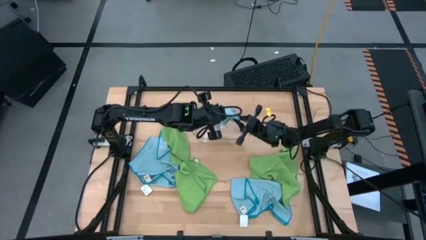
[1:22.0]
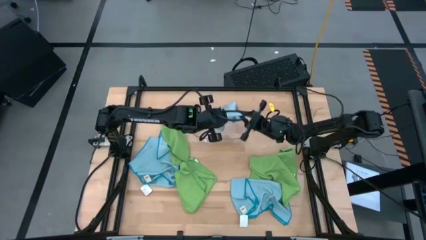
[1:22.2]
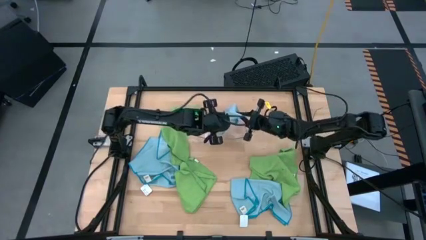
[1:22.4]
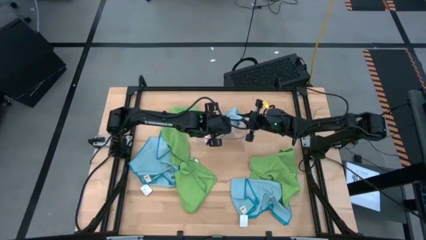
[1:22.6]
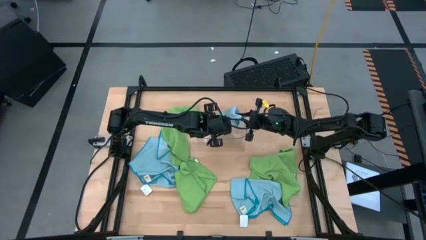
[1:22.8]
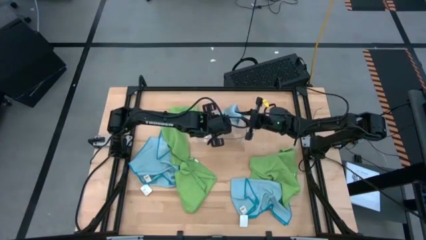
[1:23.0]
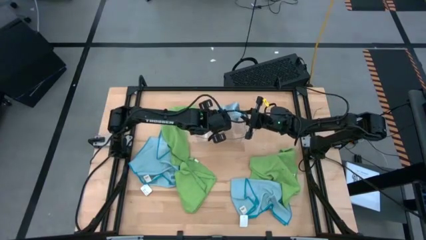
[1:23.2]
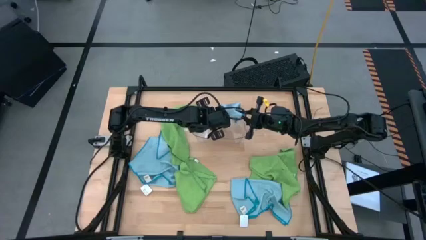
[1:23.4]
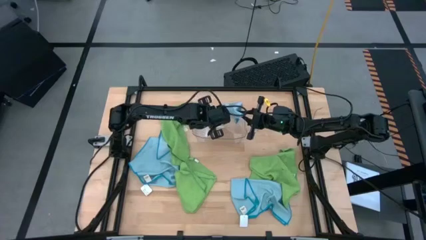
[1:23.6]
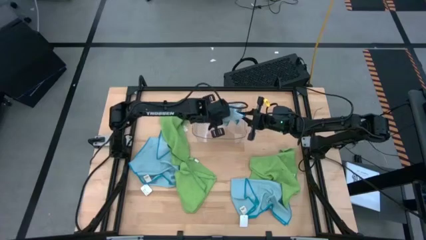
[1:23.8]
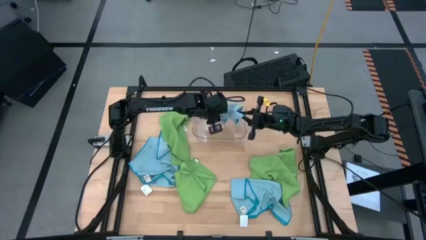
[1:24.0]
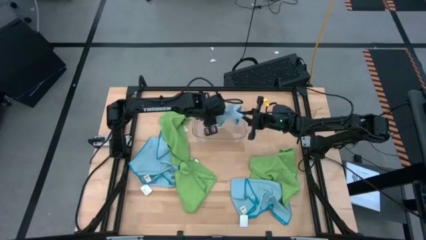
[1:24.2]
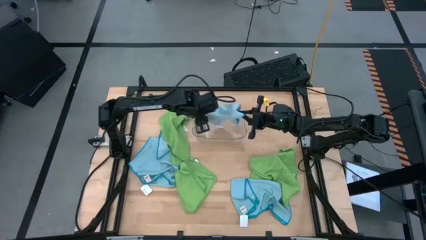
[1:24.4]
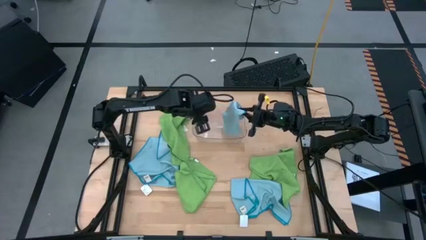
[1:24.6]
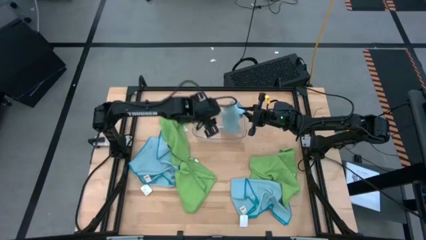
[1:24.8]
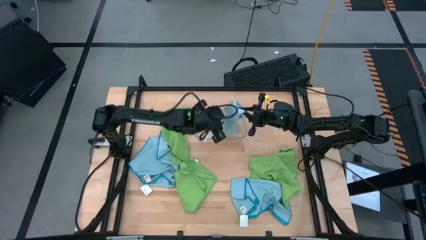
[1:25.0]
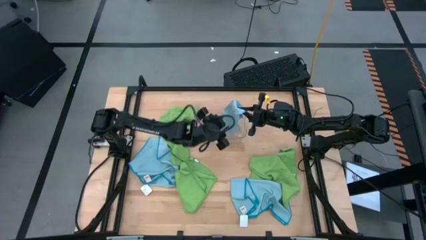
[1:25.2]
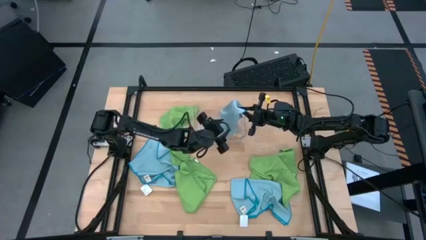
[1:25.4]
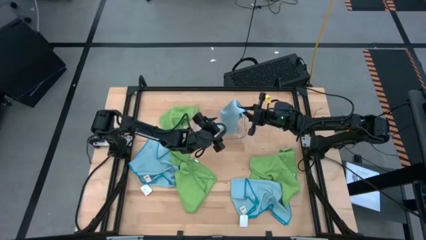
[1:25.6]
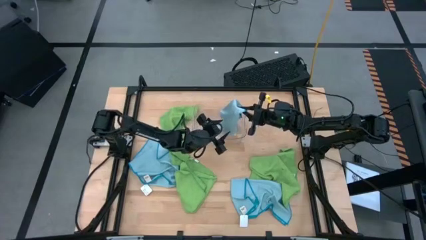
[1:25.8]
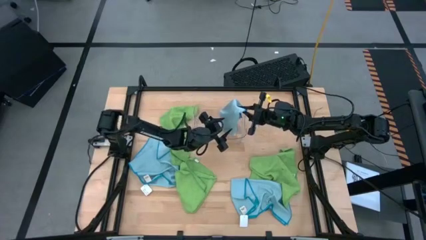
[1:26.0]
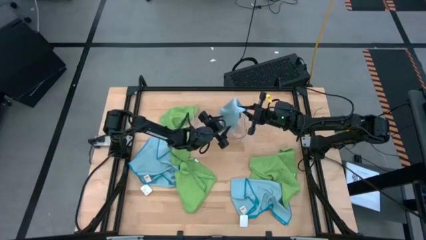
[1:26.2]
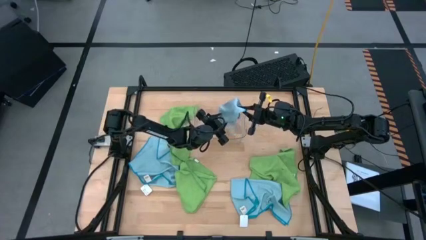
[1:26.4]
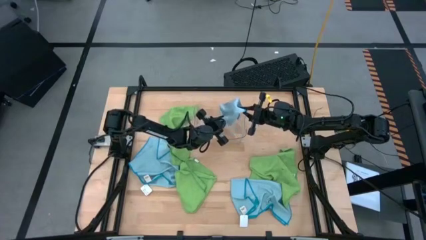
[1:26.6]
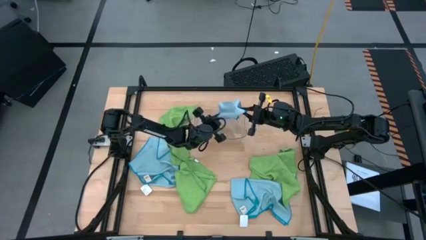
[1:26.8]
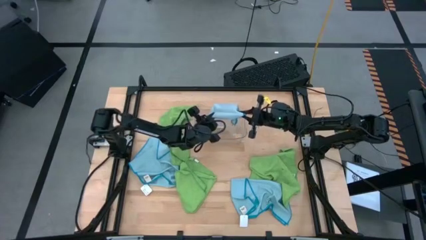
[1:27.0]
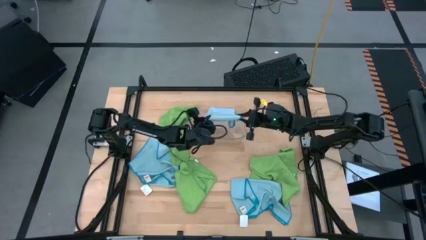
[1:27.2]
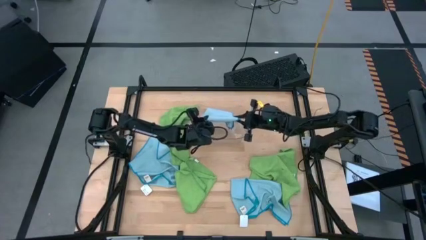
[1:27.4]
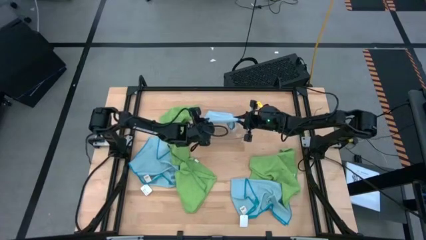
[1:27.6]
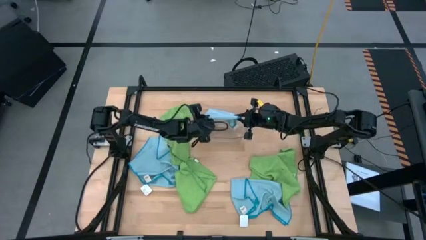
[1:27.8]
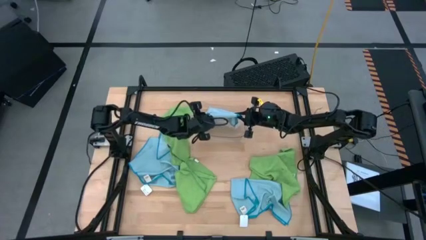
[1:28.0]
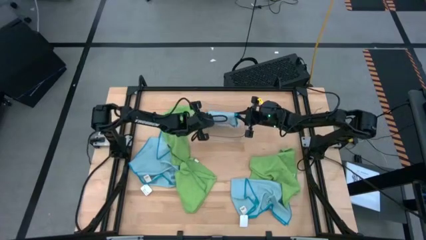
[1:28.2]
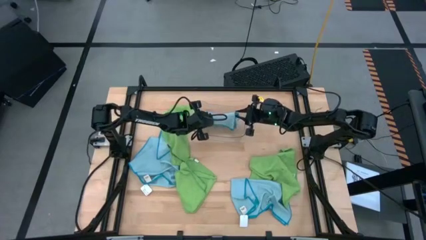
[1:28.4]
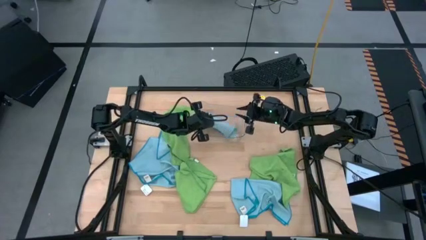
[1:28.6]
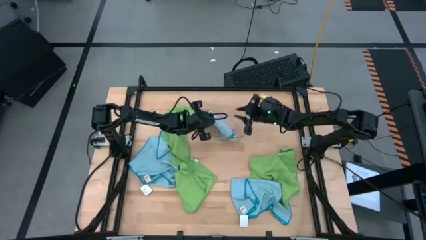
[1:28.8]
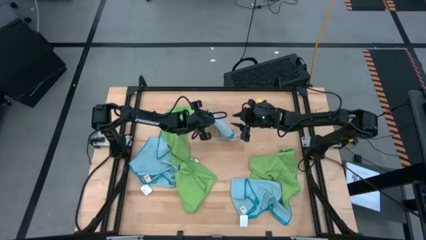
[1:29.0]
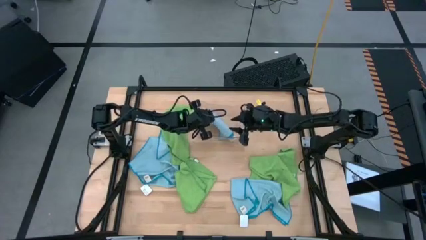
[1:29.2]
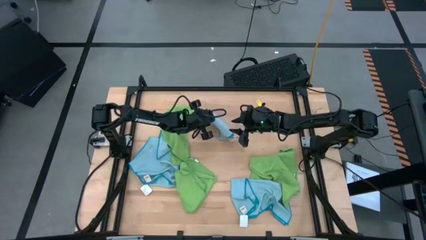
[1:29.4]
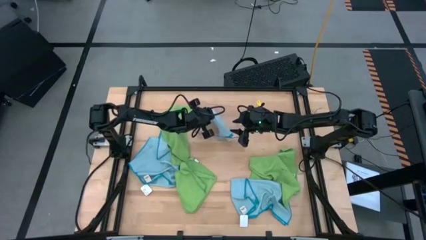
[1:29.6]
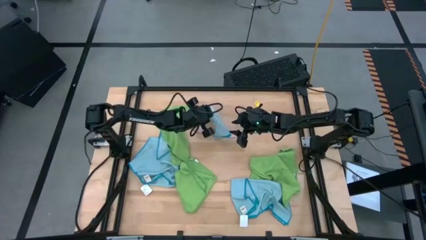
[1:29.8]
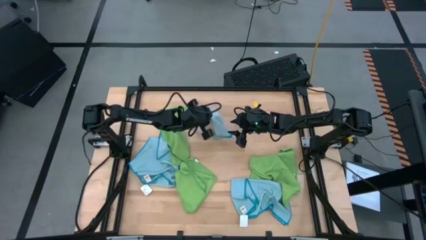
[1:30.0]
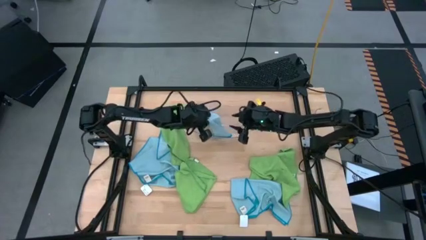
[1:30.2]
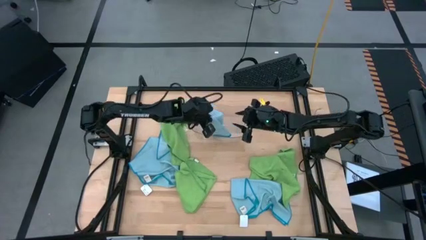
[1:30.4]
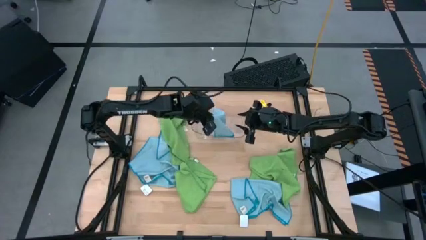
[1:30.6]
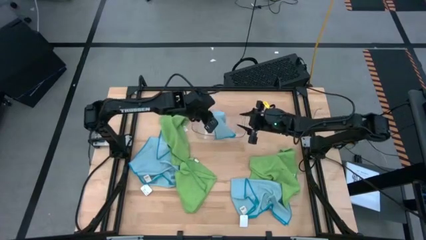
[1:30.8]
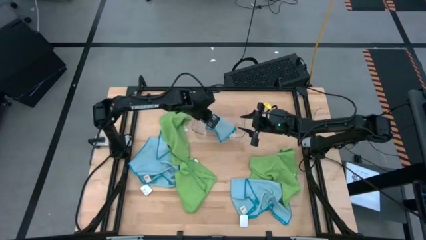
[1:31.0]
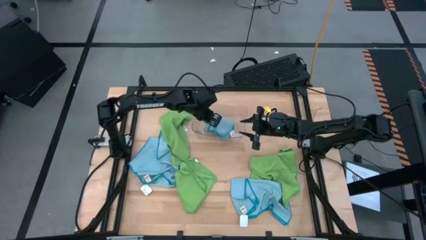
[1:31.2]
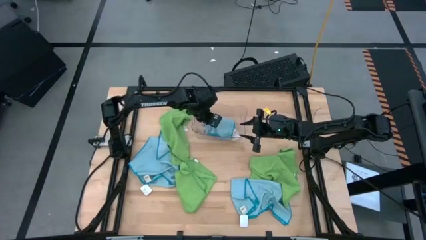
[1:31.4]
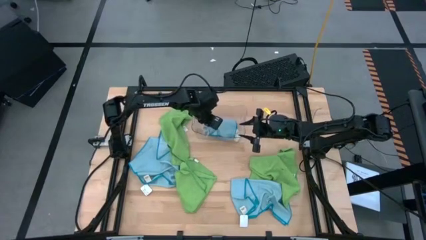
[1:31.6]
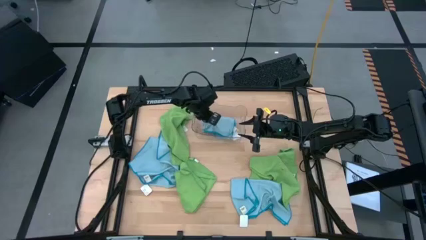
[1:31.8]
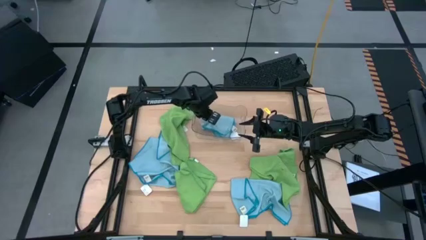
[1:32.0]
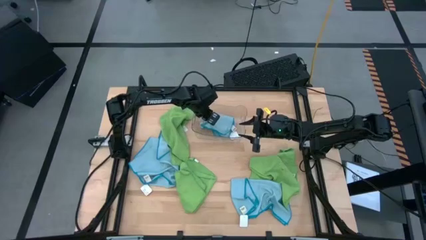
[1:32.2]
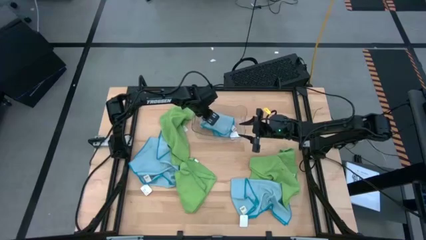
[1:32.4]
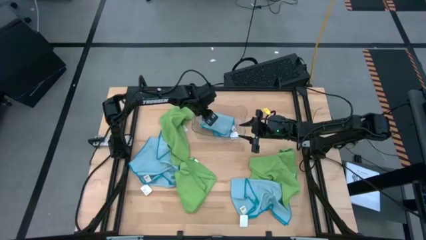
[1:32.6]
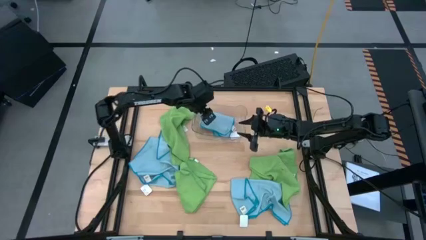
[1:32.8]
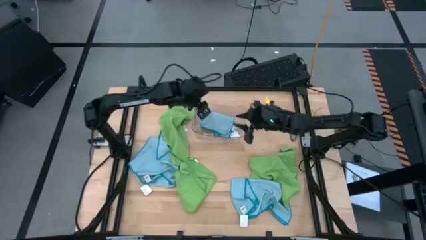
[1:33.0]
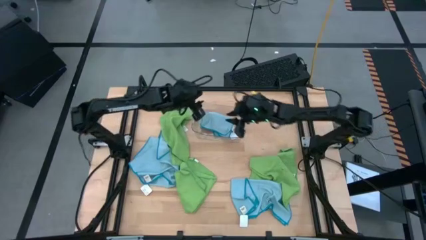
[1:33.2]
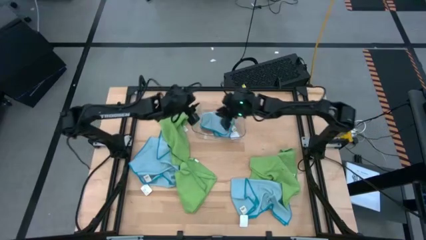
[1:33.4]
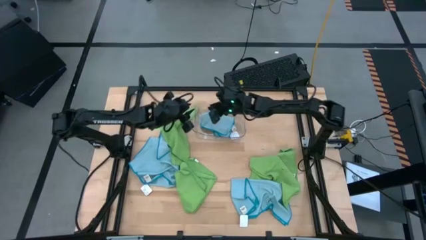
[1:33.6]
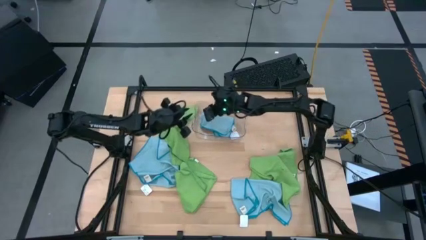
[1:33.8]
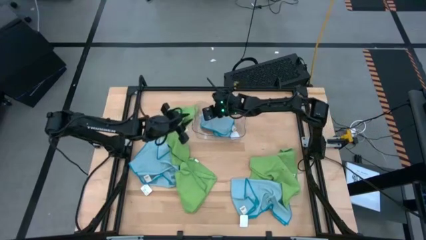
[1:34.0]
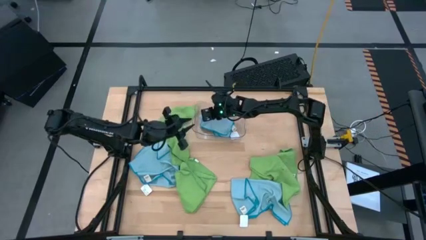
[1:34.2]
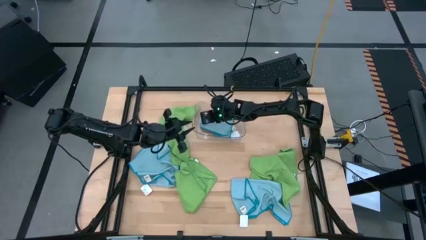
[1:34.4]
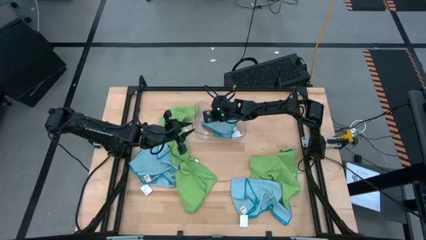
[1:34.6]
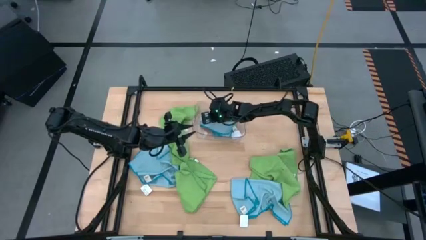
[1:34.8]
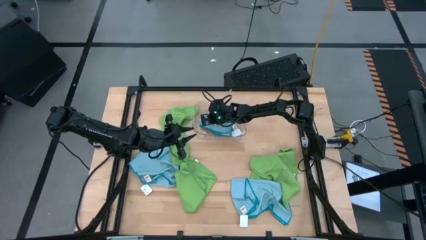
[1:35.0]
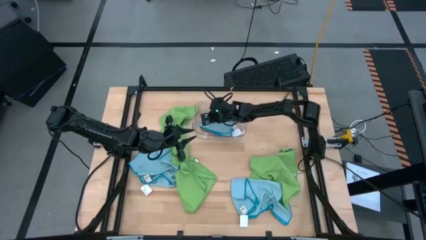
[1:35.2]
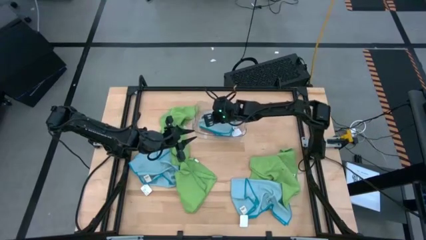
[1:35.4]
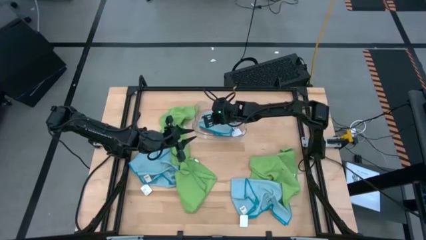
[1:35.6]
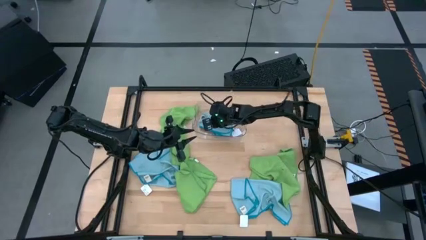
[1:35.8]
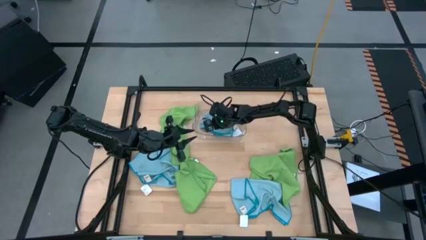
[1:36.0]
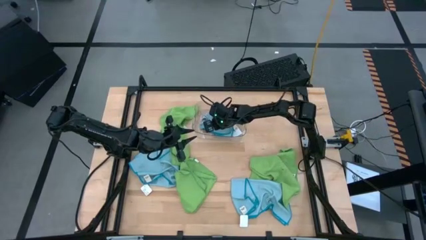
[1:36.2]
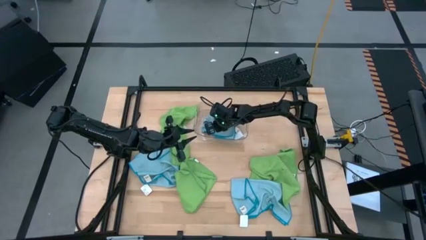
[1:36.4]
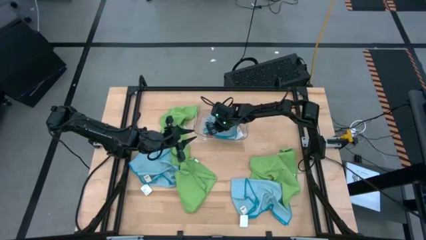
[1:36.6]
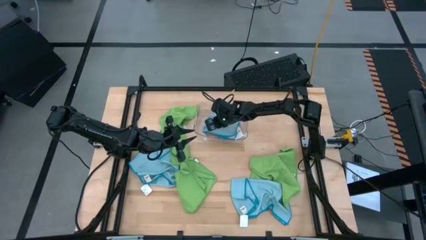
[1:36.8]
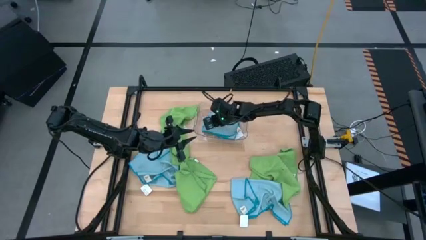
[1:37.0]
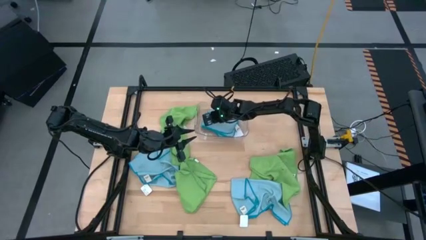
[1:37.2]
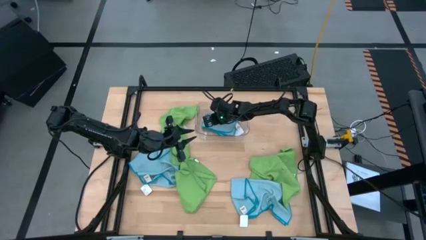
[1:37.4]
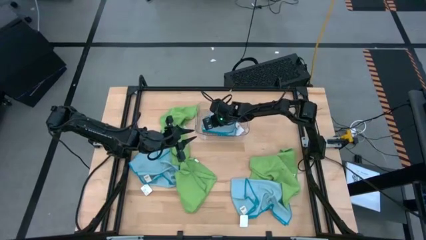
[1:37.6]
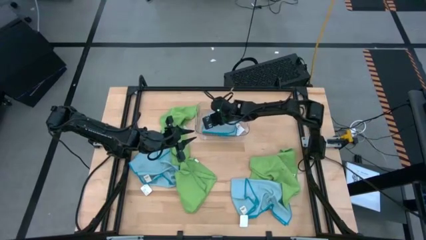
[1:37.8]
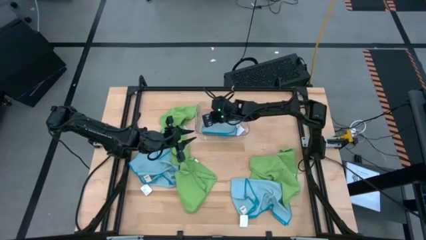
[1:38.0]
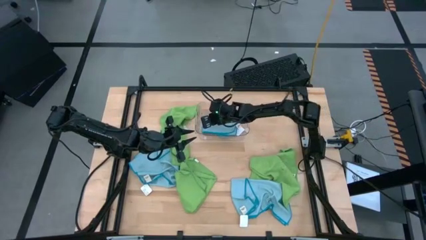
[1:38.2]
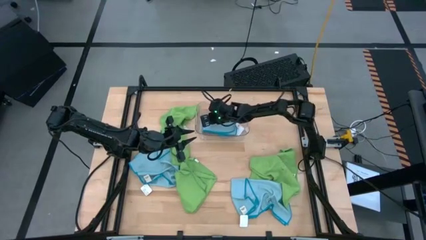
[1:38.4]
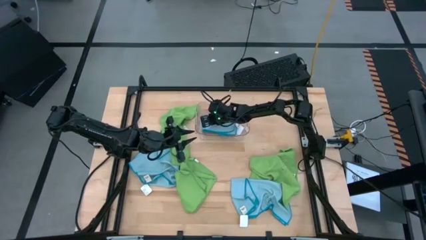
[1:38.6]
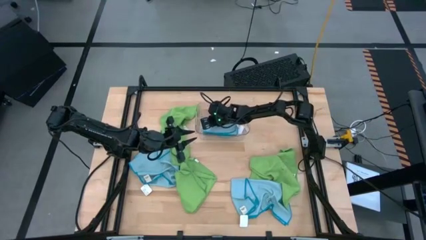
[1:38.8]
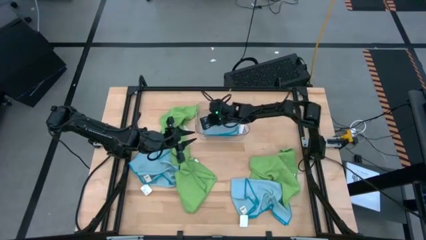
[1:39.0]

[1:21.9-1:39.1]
Task: Fold microfiber towels
Put the folded top right blue microfiber cloth into the transparent bin
